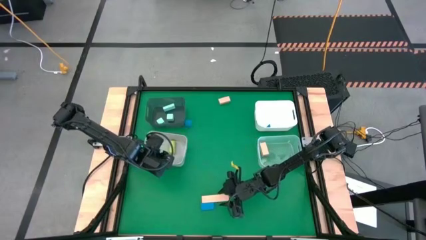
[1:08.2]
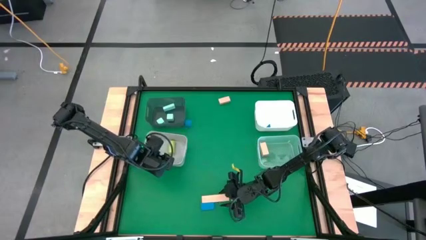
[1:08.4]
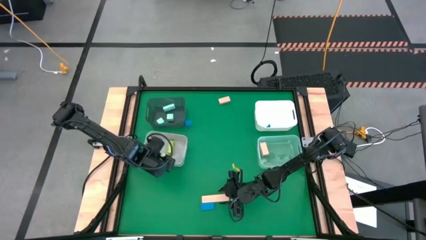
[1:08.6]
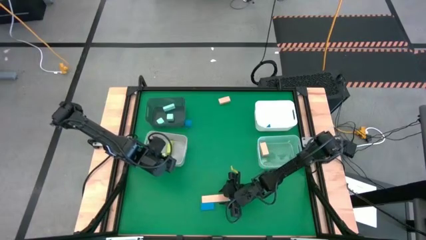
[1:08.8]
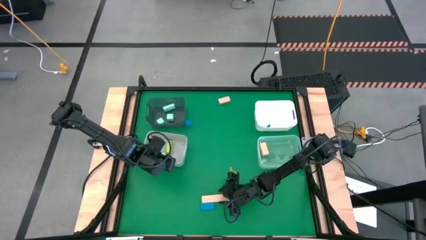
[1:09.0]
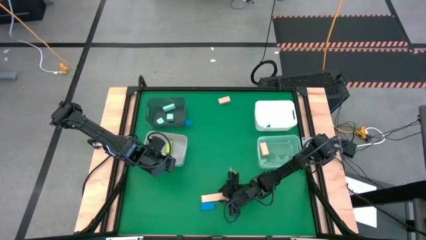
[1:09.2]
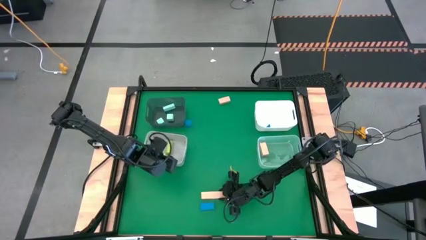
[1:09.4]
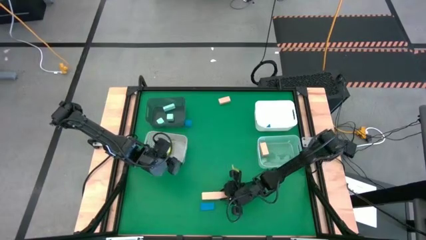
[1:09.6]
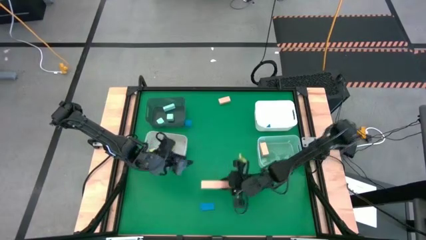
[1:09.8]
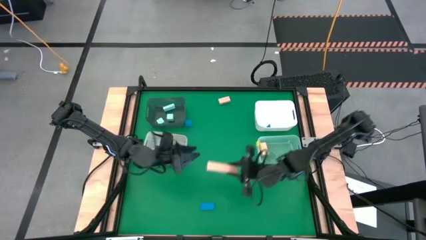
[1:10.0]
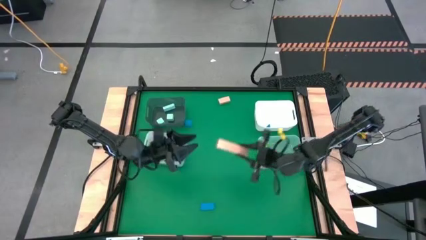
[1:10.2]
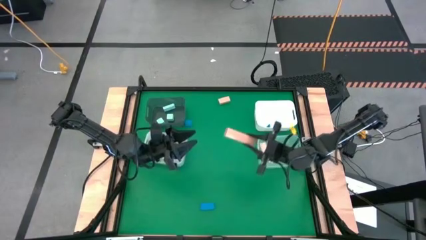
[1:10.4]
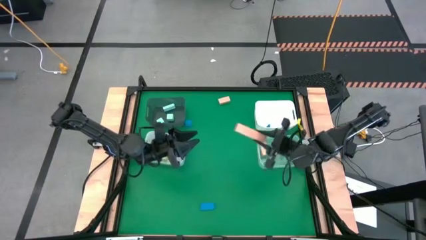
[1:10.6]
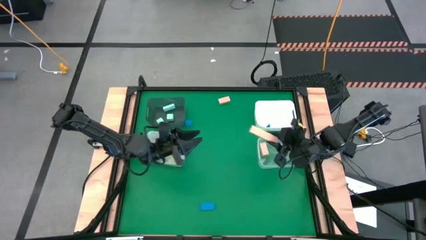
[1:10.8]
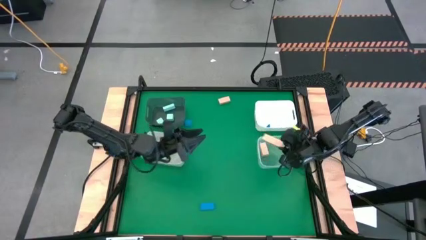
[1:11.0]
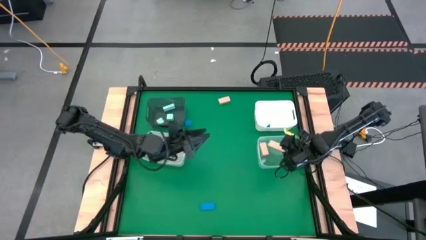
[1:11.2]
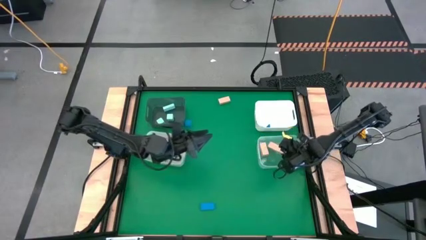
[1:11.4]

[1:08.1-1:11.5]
Task: Sort & place blocks by color
Put the bottom brown block into the transparent bin

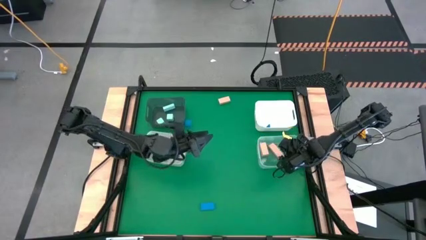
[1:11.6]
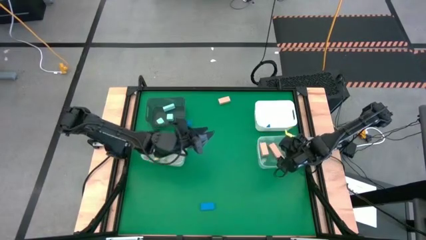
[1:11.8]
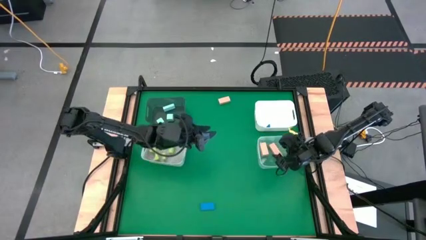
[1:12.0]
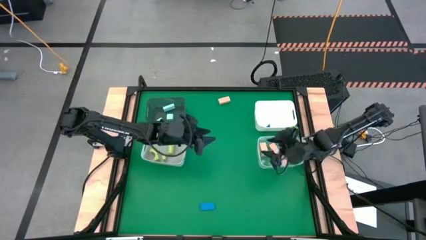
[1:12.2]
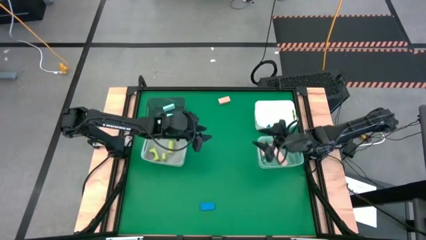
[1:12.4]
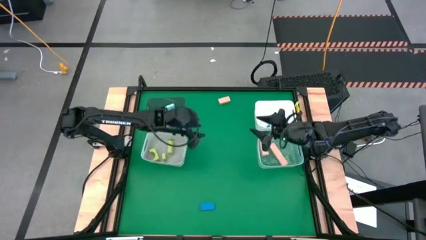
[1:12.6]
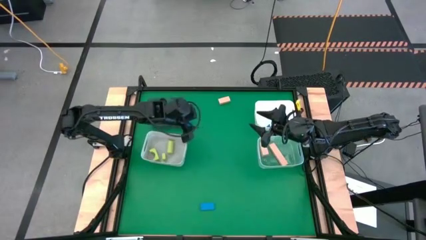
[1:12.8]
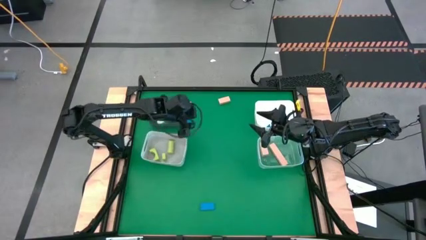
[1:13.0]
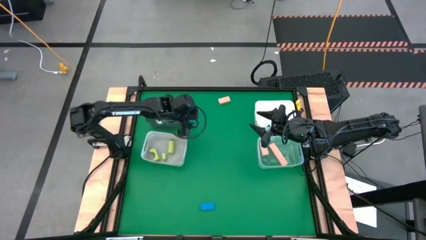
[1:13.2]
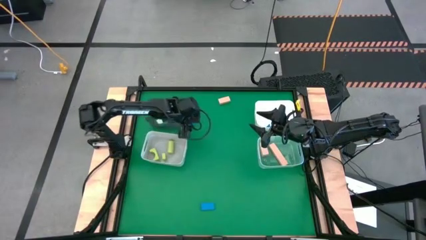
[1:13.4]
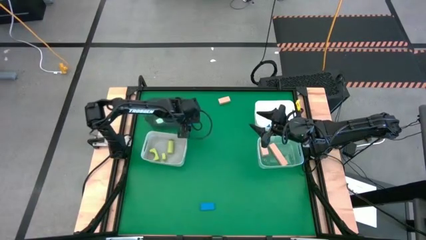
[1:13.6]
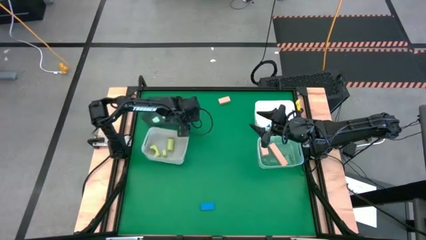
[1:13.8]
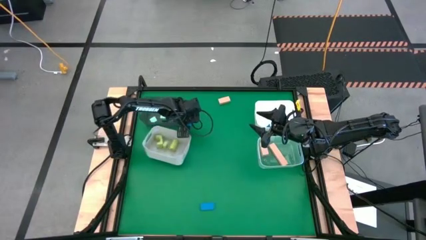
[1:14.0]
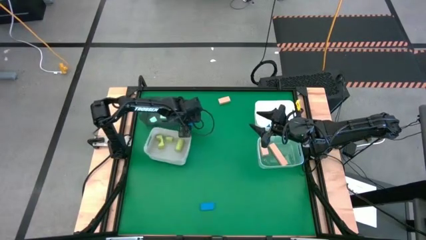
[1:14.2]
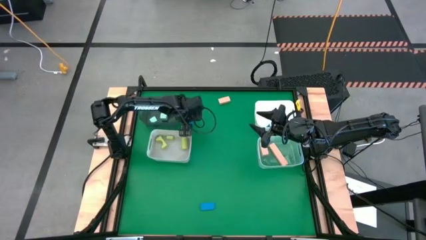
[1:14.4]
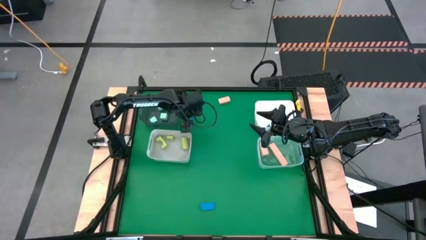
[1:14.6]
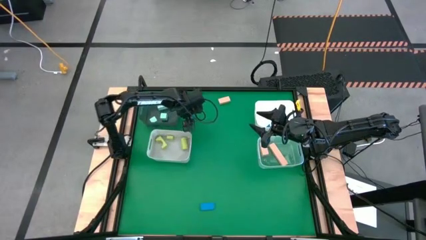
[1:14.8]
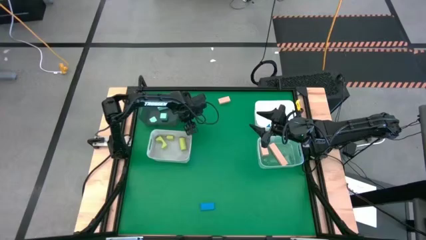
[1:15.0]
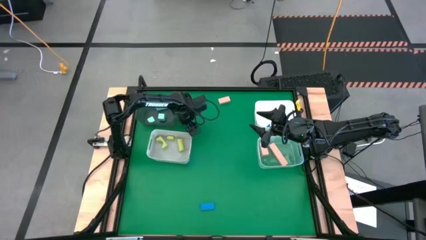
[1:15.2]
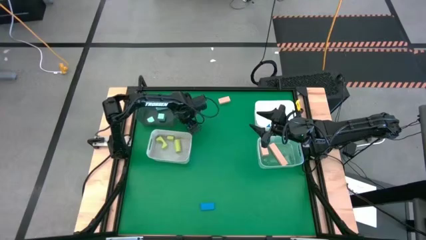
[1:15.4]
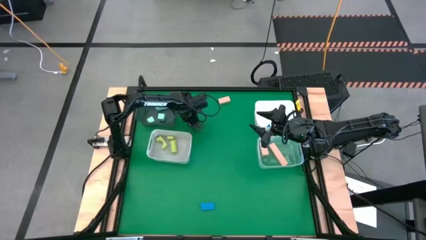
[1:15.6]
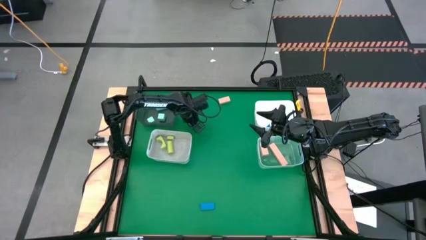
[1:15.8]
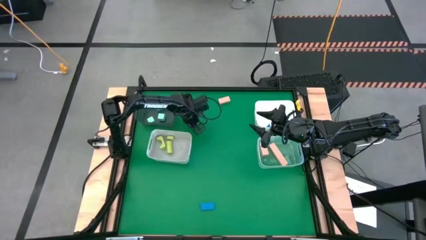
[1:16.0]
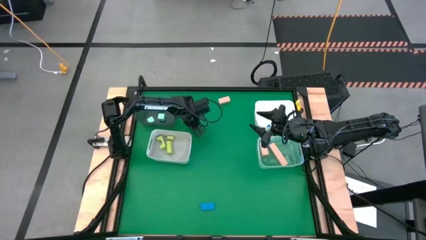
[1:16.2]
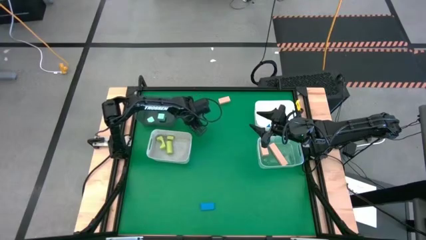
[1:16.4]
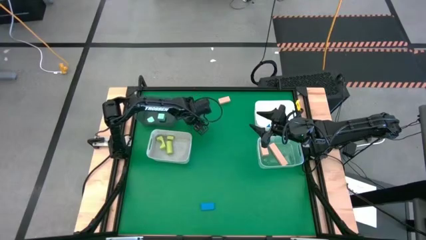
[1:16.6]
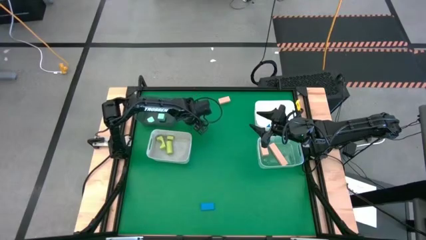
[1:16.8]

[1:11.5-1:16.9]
Put the top blue block into the white bin

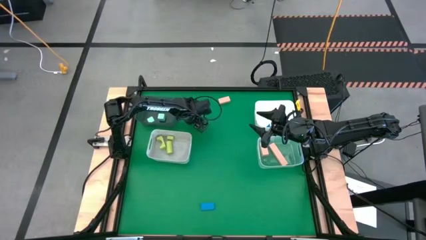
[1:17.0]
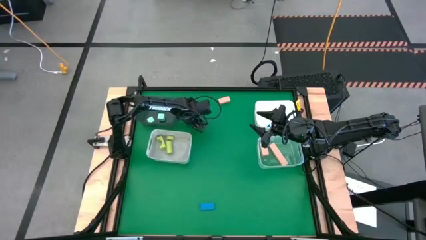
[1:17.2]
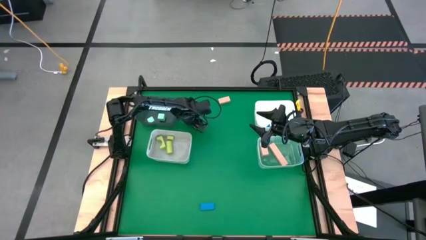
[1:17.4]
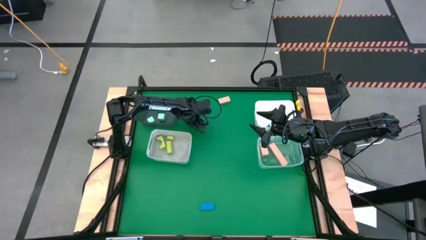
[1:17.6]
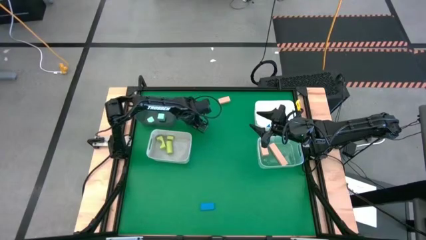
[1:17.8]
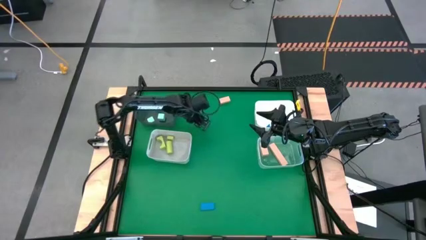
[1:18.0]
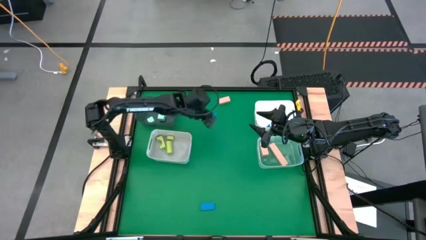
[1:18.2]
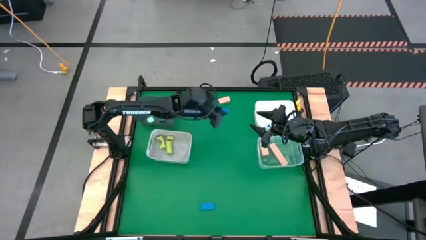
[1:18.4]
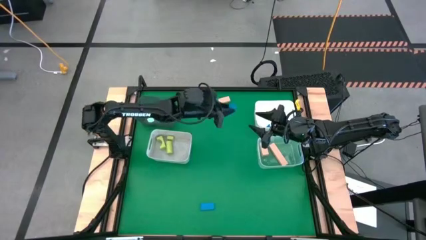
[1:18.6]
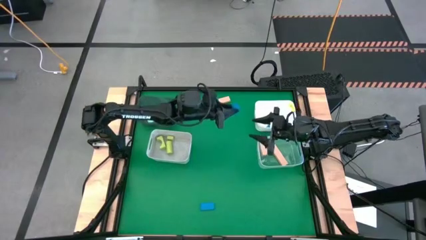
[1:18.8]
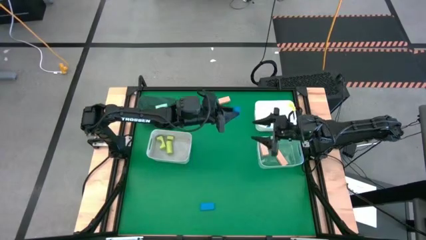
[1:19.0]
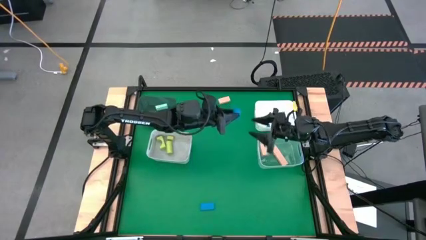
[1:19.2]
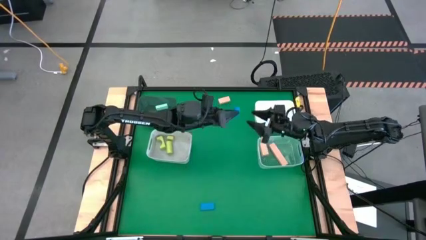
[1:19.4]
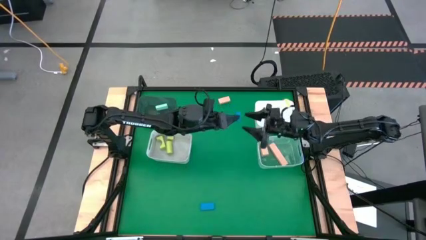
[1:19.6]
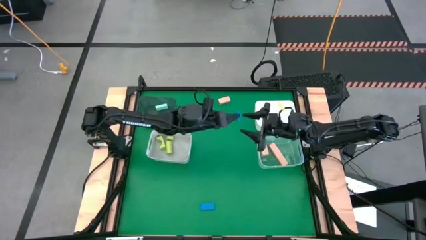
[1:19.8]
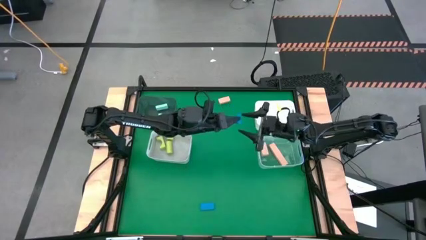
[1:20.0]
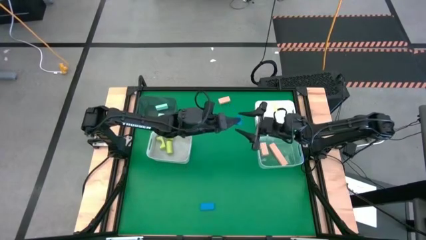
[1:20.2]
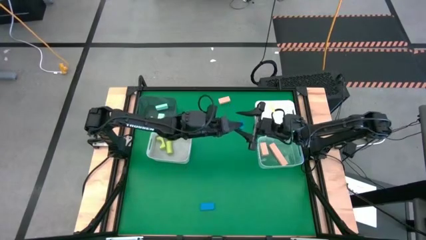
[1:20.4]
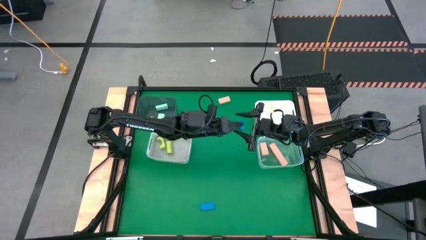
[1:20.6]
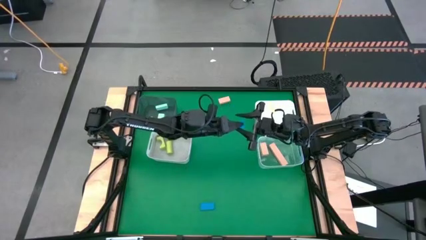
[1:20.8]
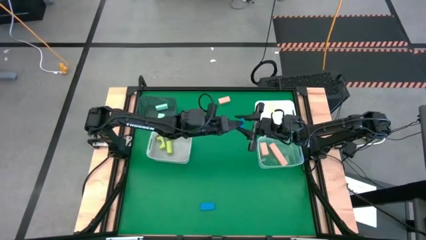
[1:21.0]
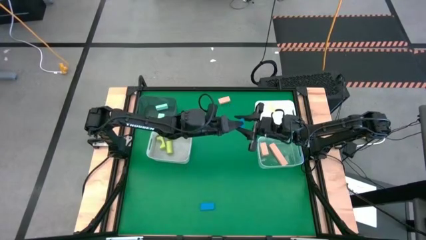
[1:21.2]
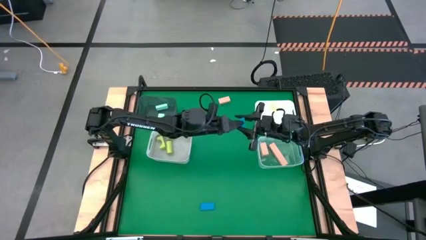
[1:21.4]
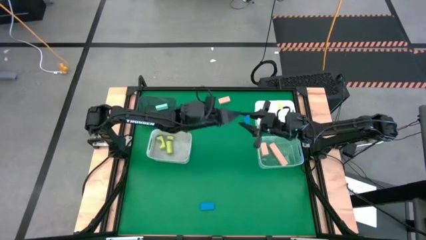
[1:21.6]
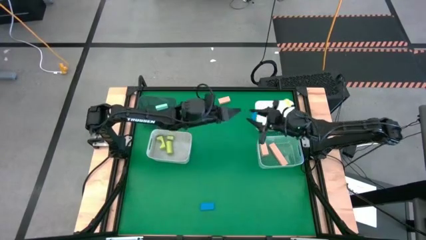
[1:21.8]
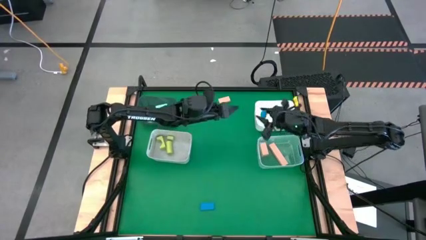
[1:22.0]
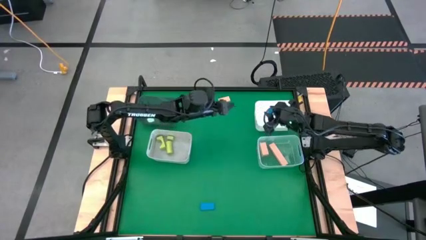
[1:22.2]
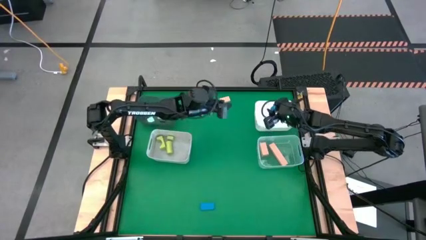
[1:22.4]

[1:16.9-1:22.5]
Put the top blue block into the white bin

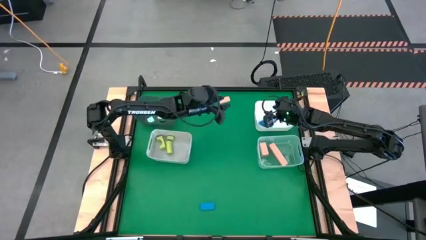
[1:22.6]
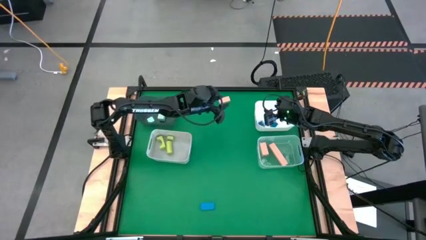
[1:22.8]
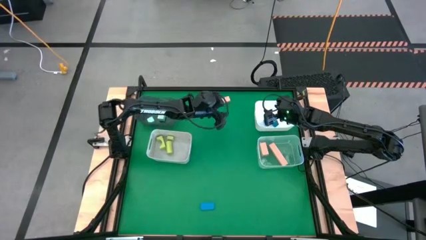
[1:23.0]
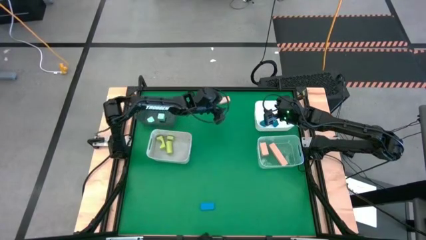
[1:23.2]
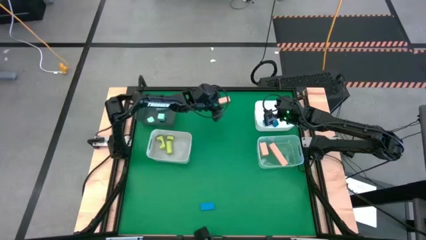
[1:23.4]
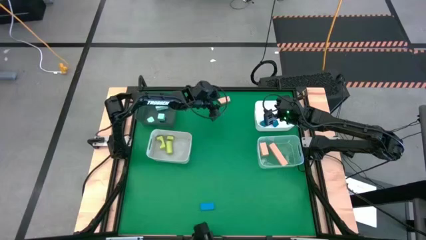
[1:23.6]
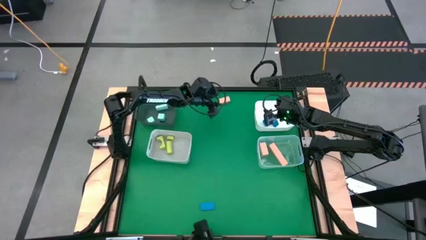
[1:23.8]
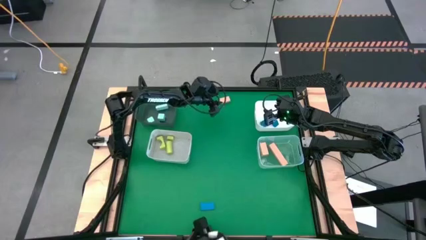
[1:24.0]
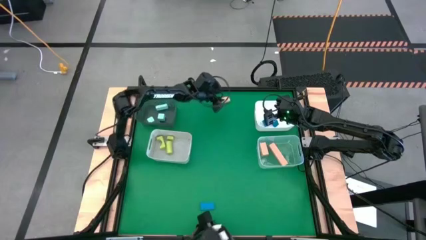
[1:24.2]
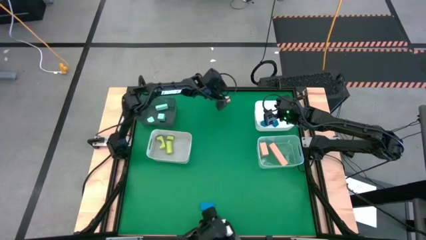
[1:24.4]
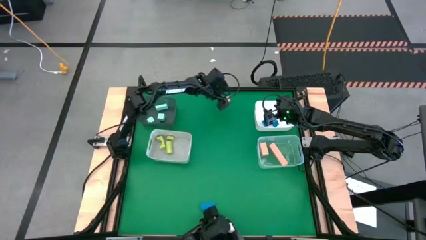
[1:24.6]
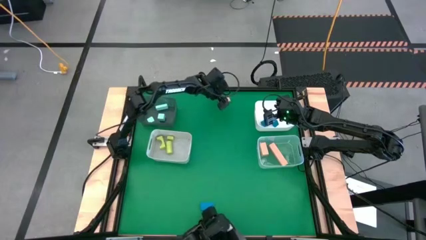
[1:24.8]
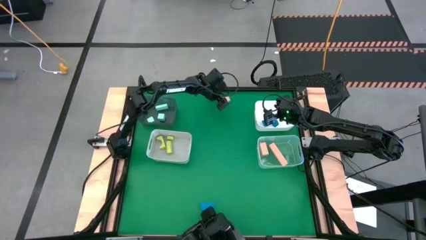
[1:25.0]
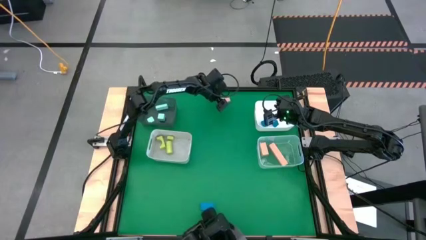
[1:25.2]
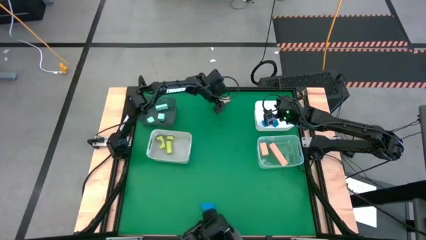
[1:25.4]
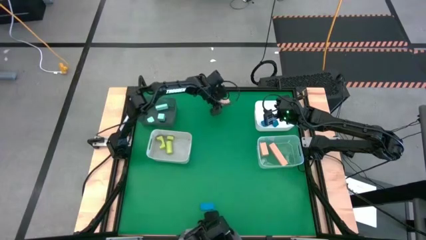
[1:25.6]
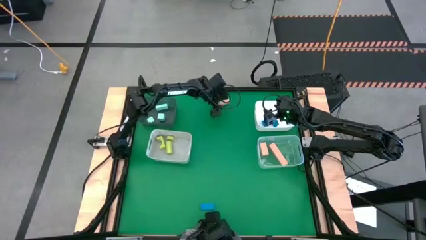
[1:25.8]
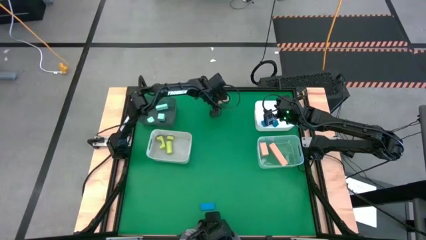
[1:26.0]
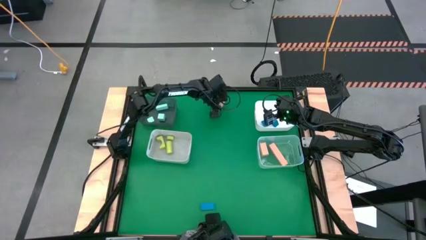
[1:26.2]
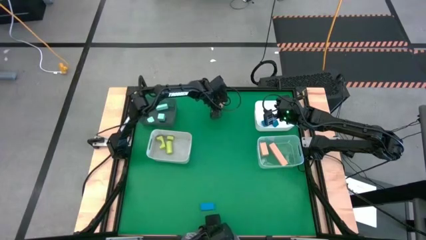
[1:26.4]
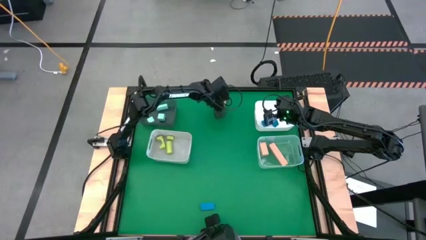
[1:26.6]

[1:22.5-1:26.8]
Put the brown block into the transparent bin
